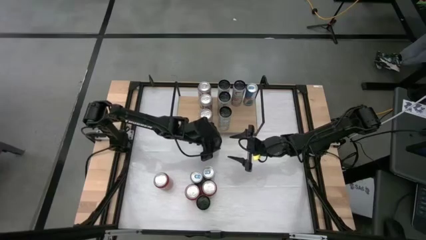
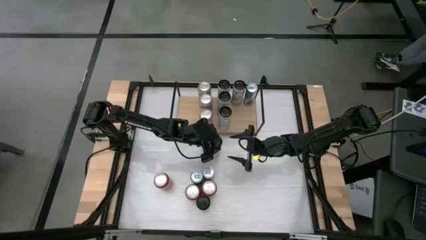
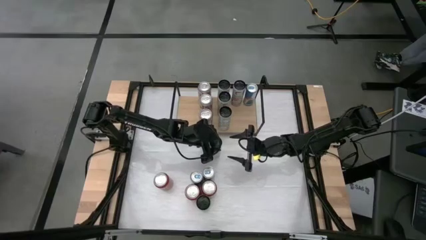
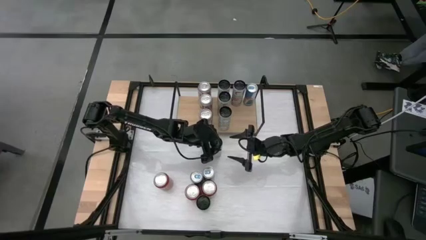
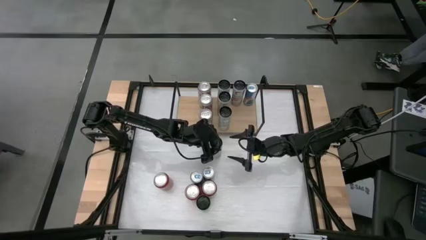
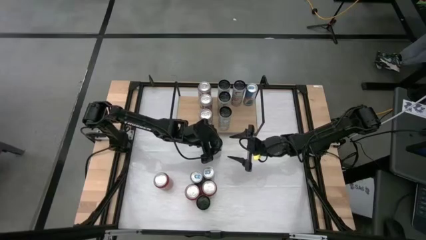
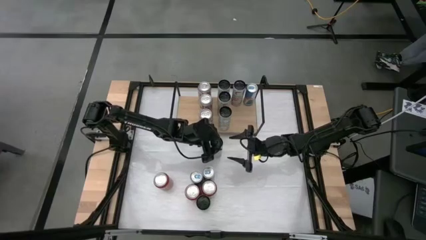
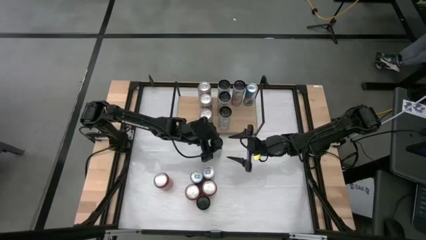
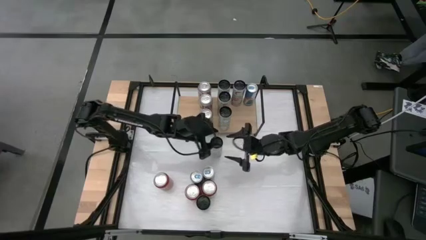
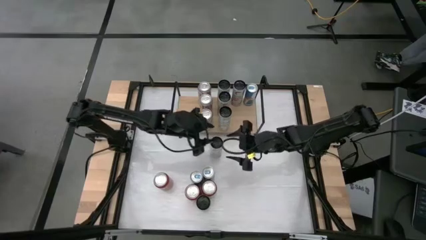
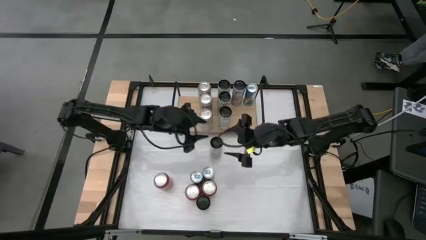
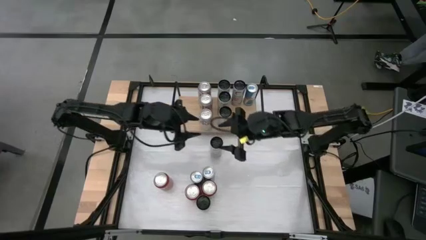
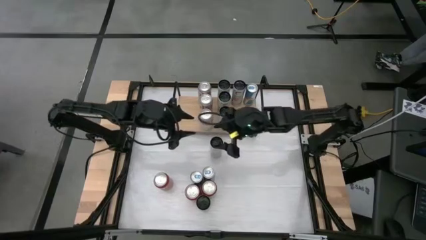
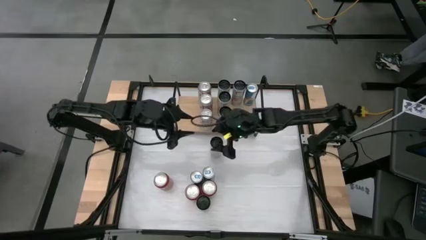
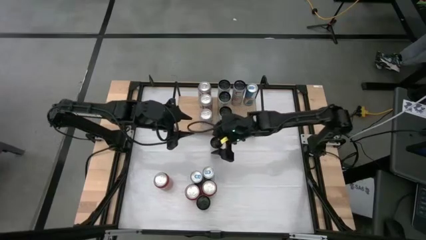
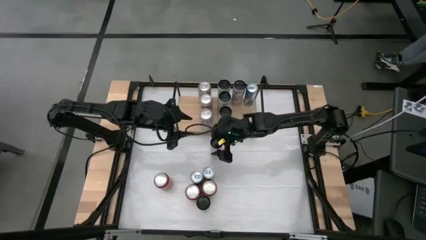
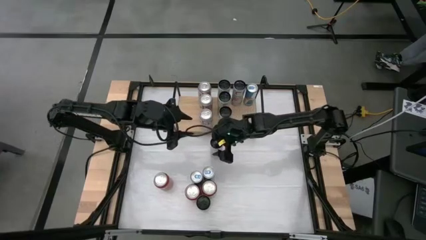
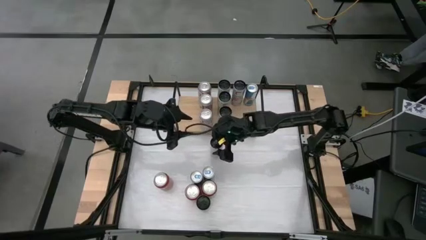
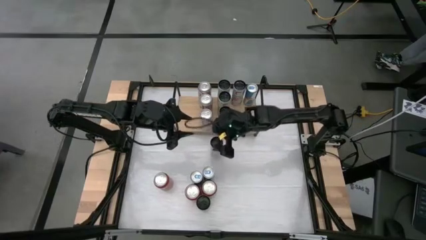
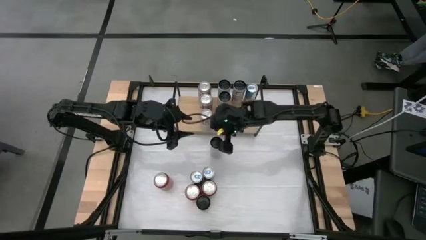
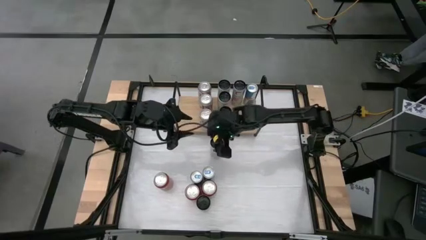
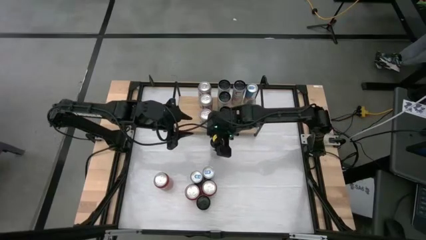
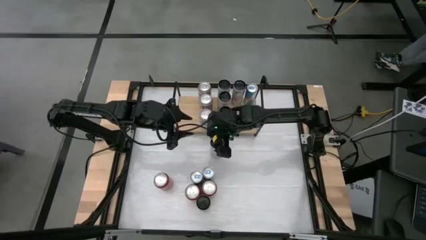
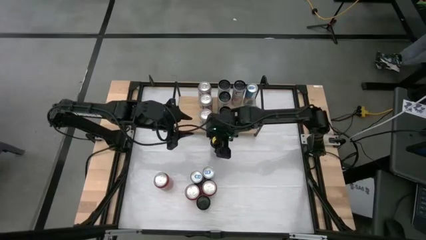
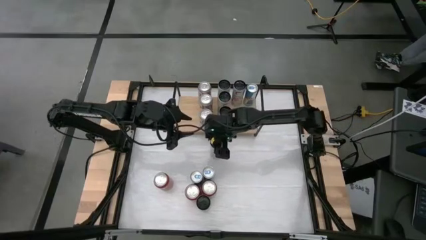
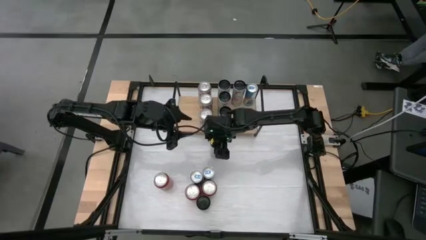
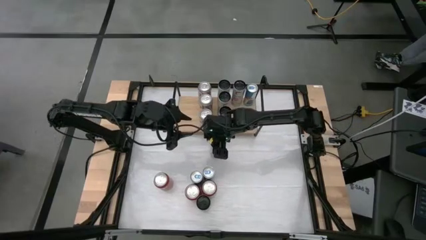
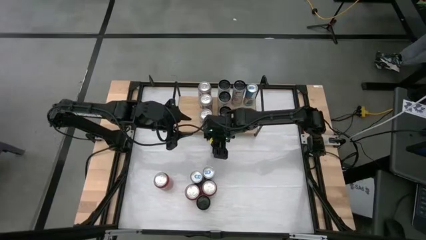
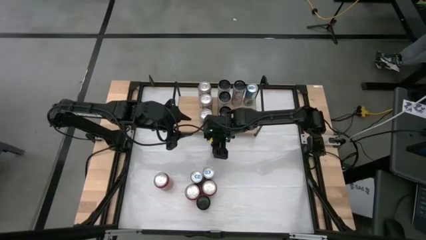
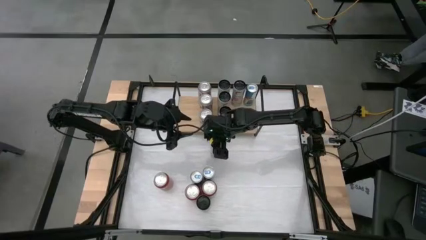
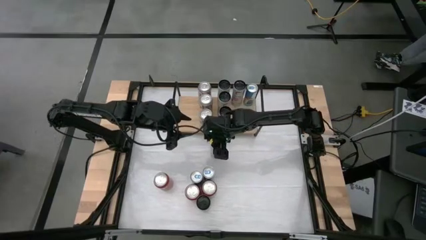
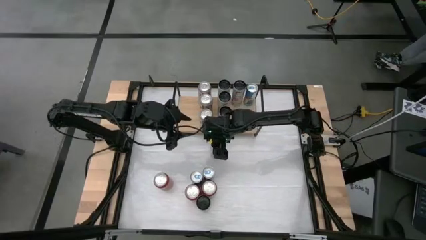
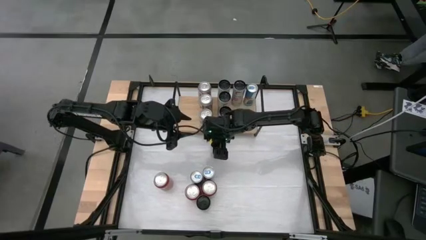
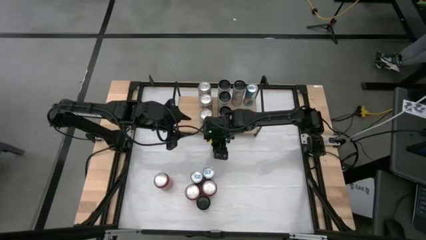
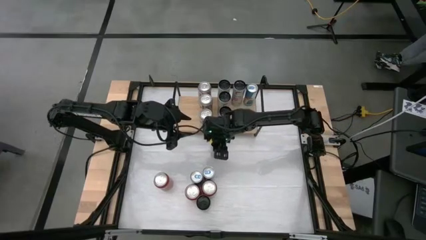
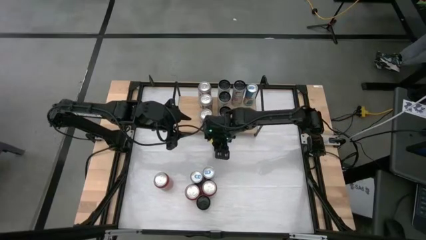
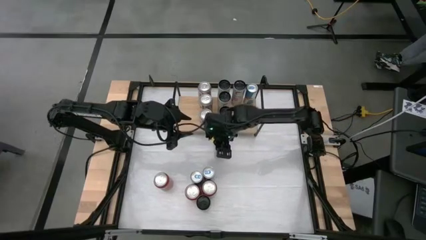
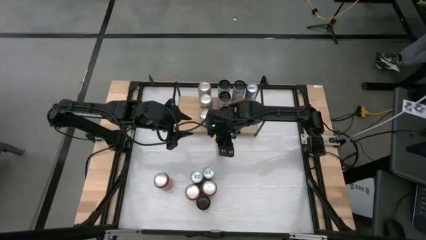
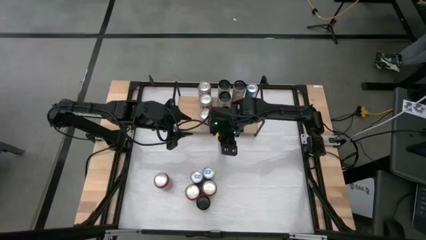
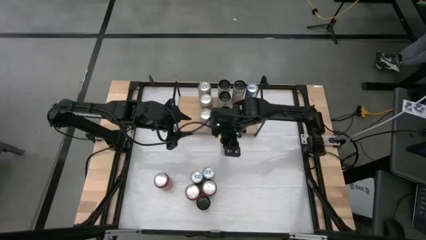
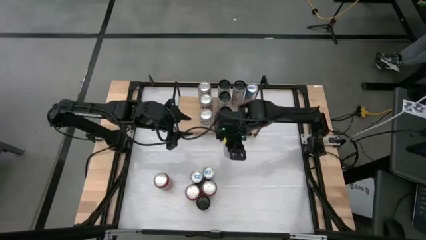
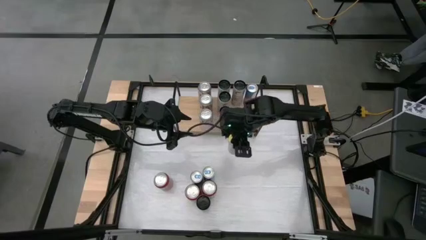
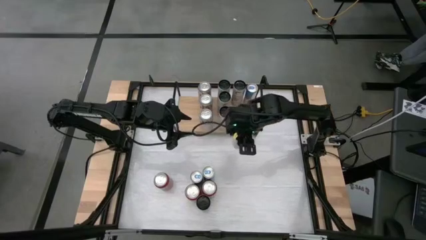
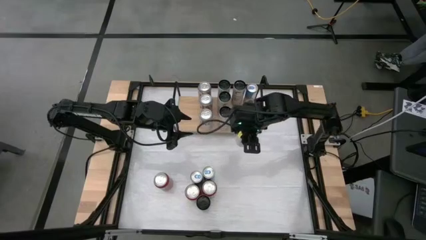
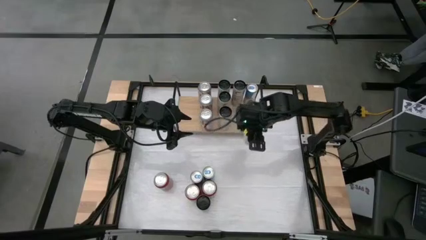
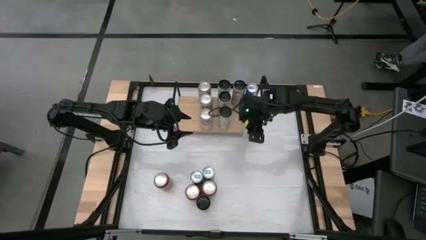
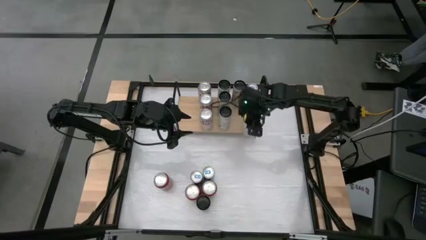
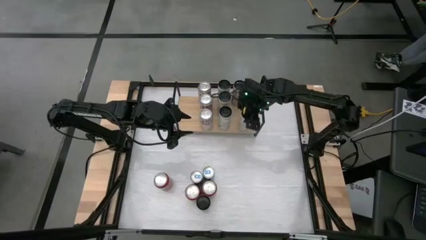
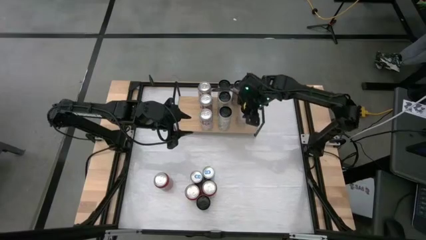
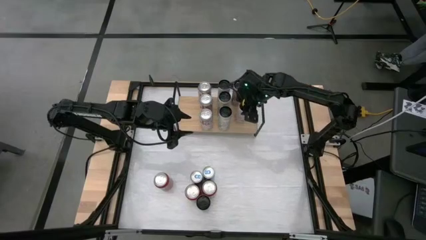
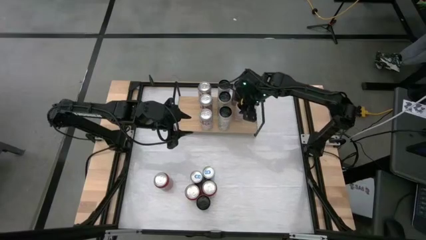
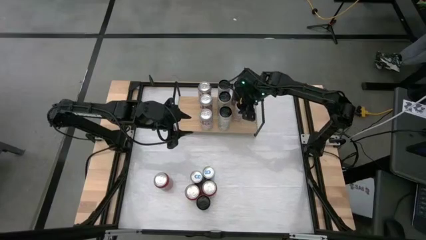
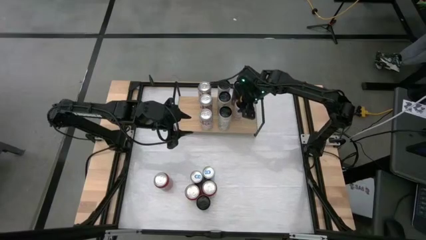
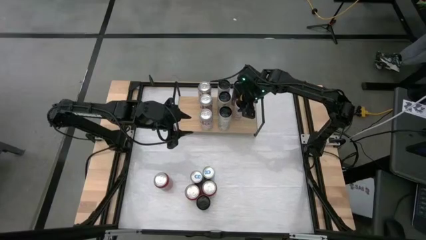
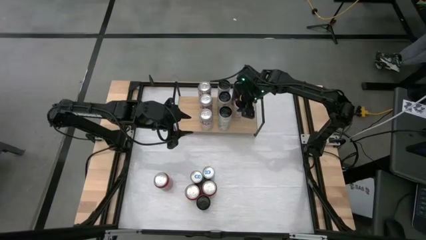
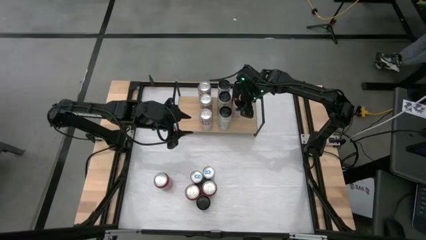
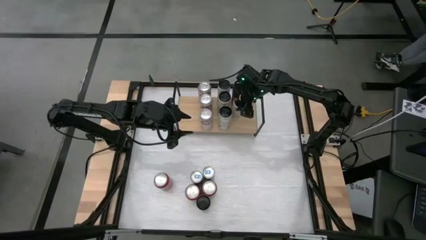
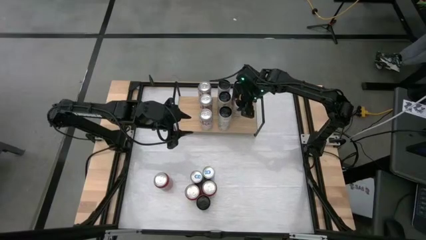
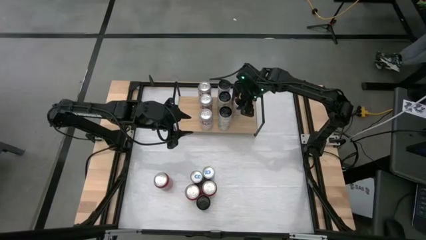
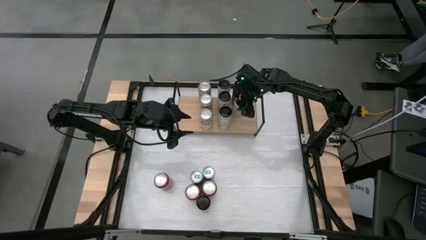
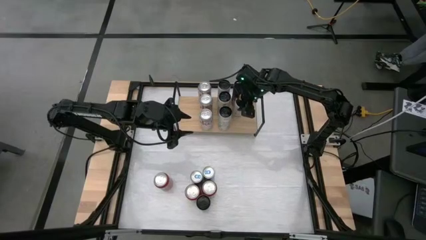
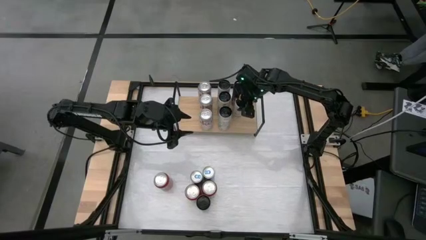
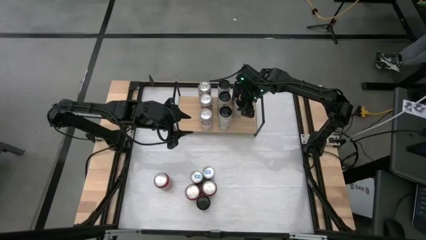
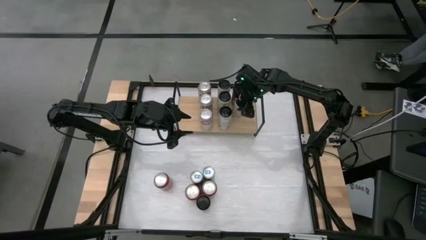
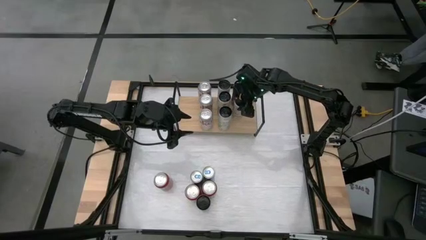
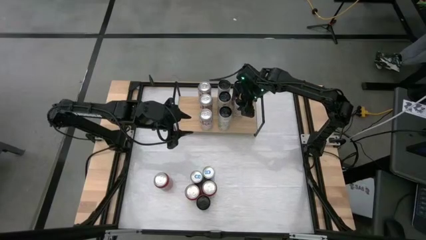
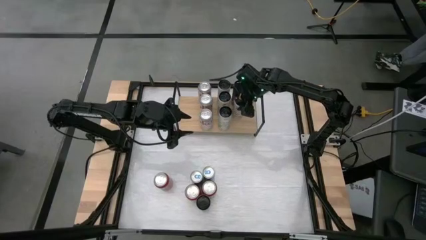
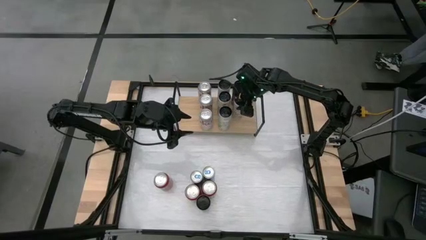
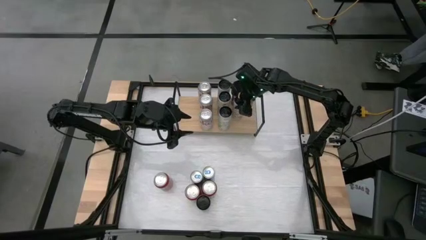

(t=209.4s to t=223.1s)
Task: Place canned beverage on shelf
Put the white pink soda can onto the shelf aligned with the other white pink soda cans

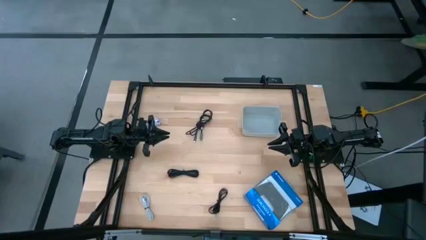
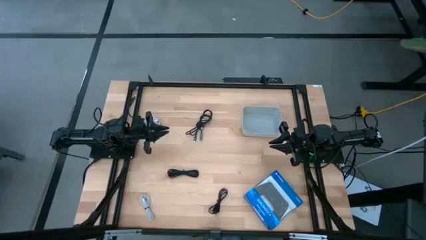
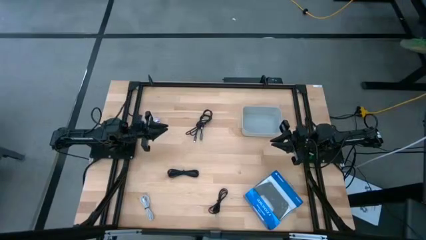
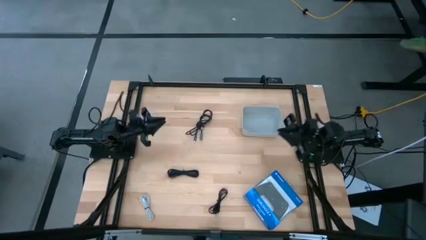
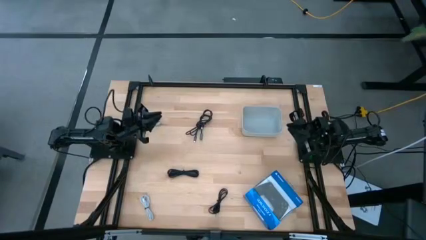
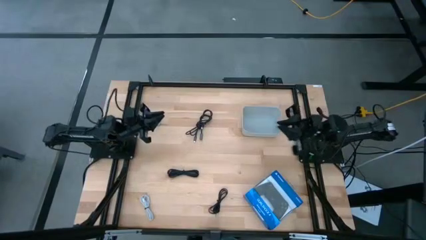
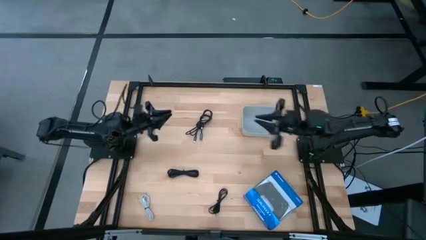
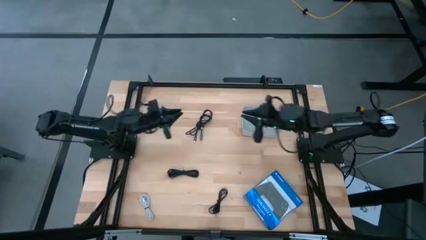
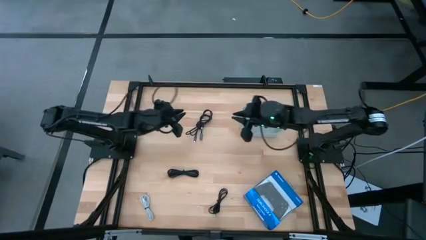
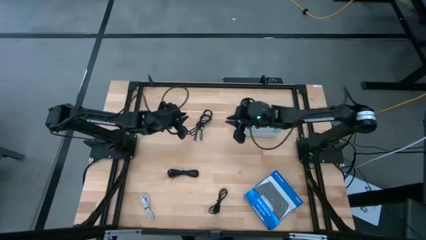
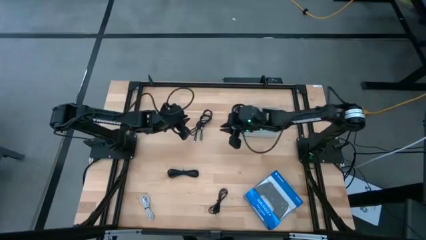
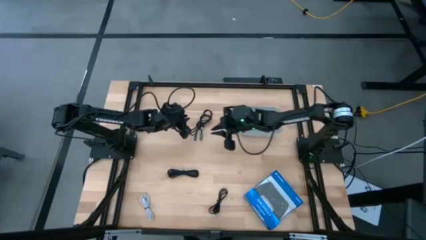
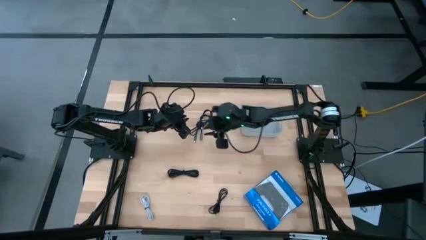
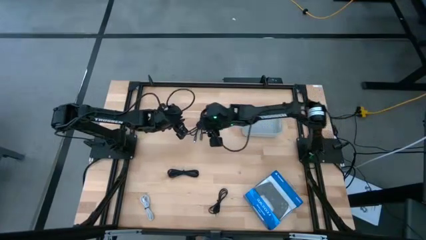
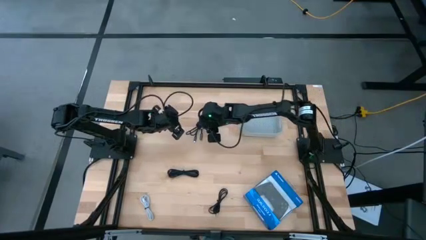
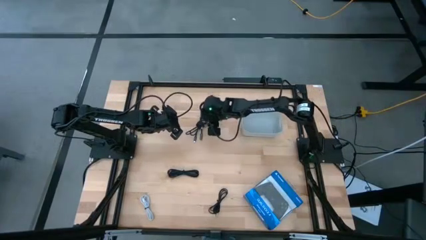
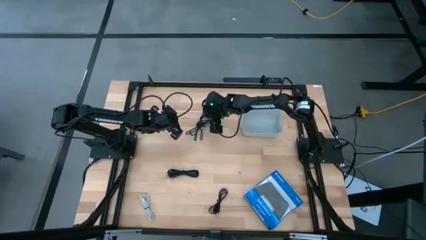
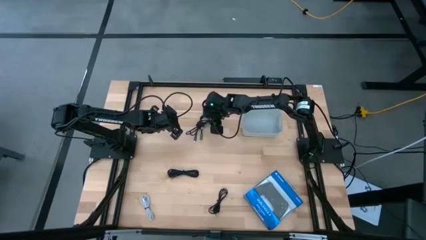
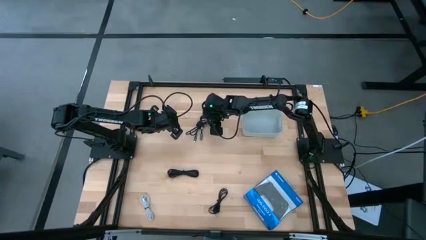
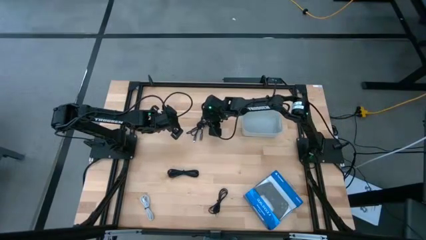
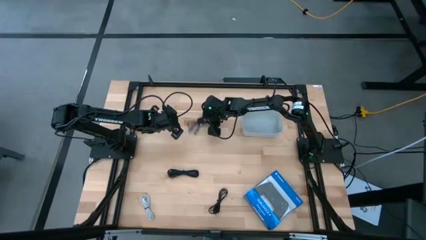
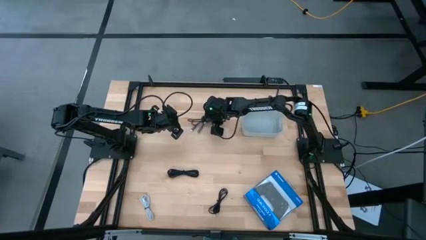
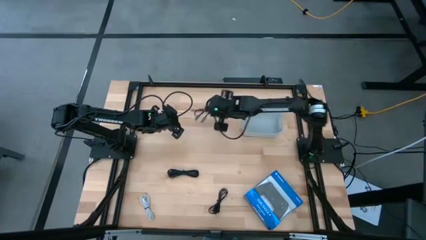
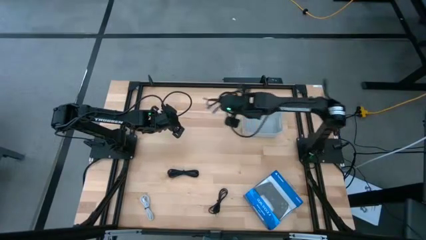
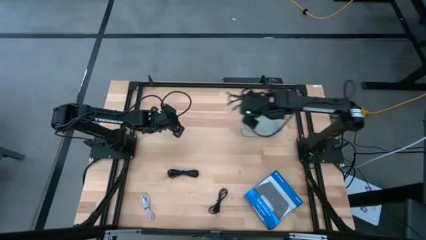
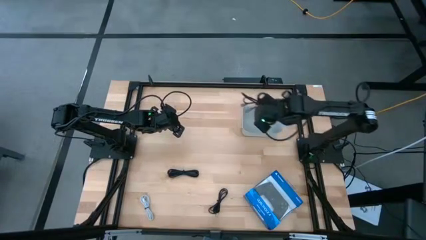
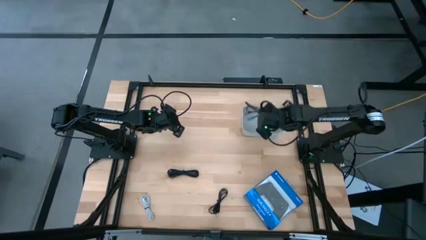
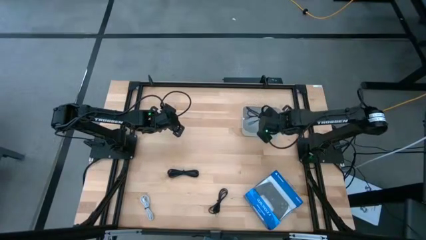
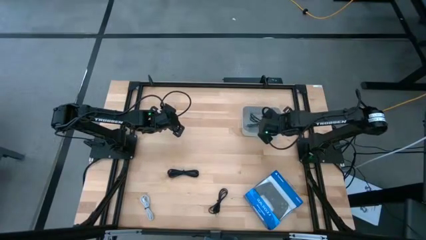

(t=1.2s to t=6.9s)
Task: Pick and place USB-C Cables
Put the top black USB cable into the gray bin
